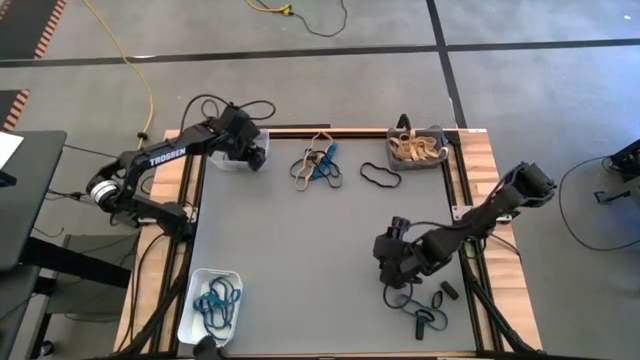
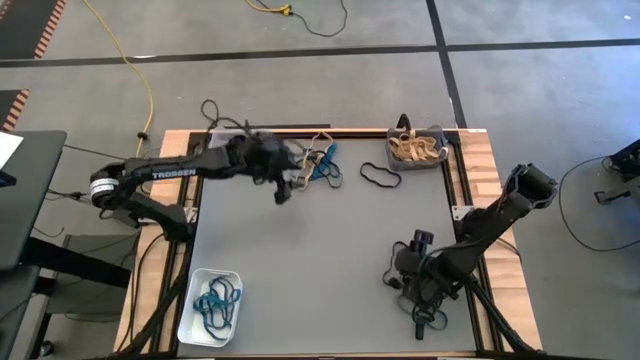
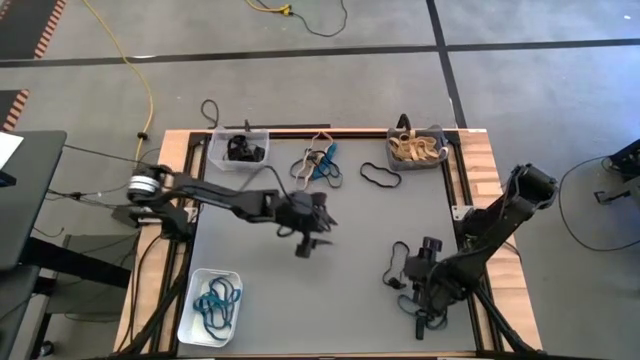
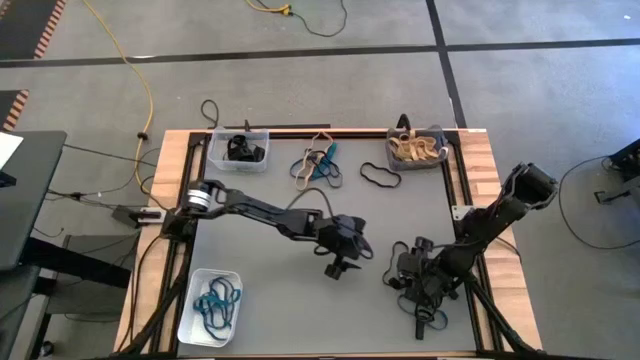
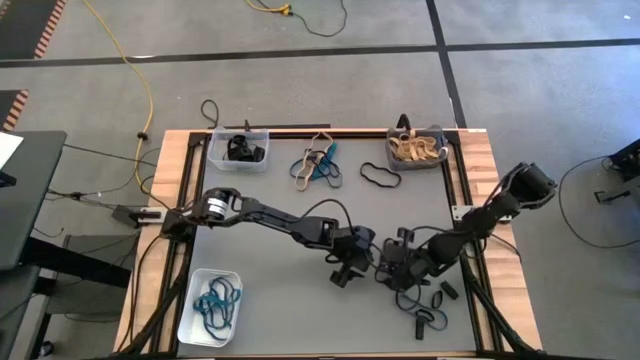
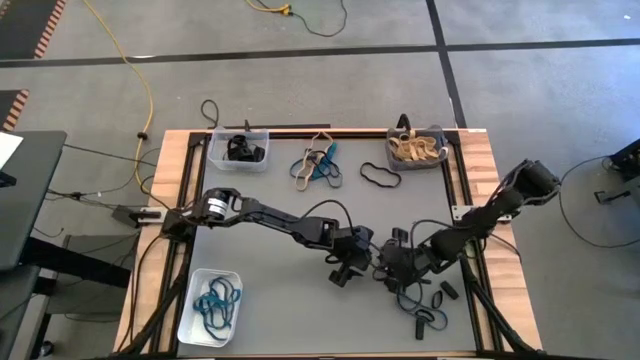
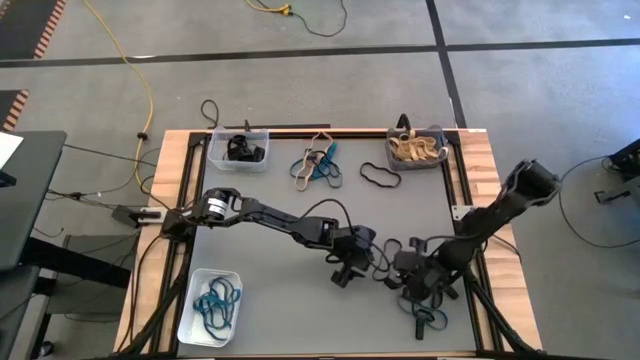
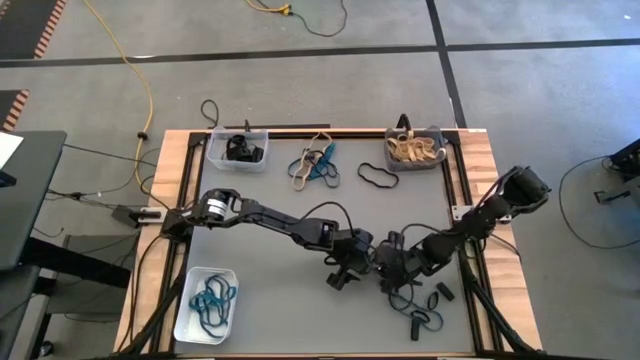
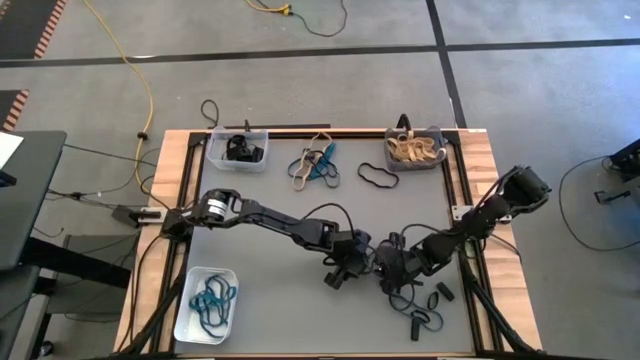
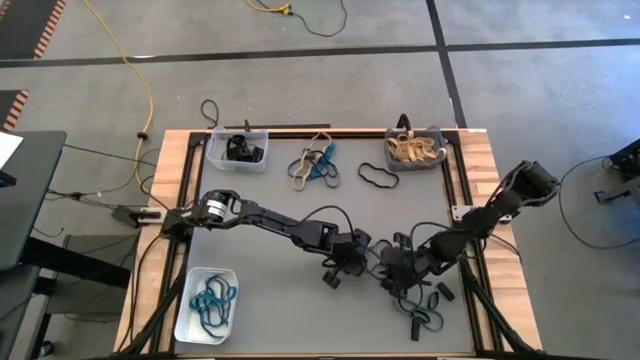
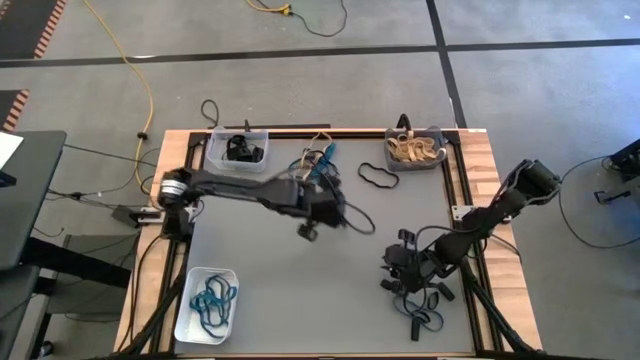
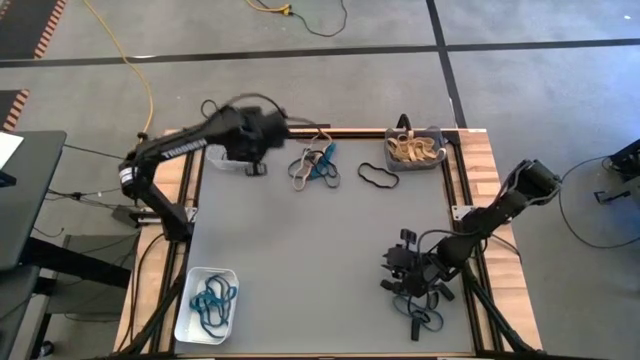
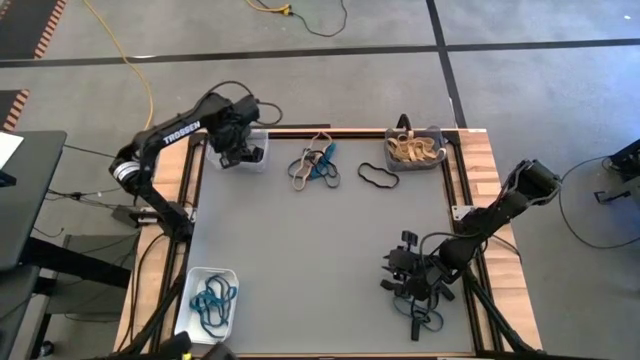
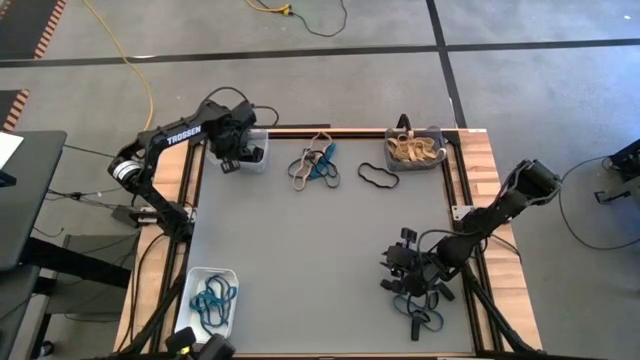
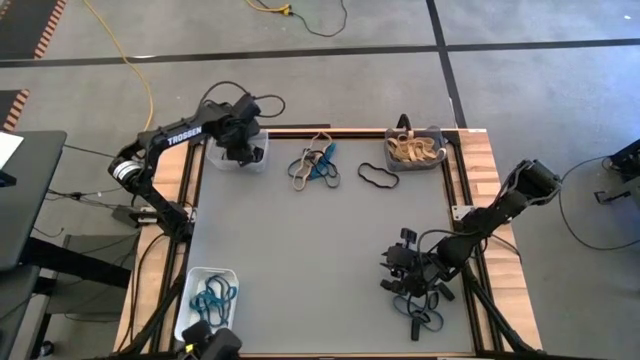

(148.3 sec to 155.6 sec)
Task: Sort rubber bands into baskets
Put the black rubber band into the transparent bin

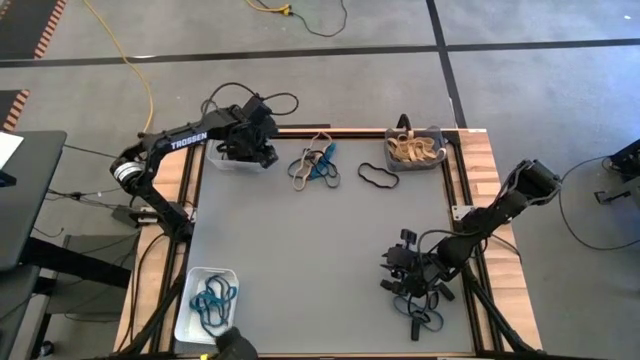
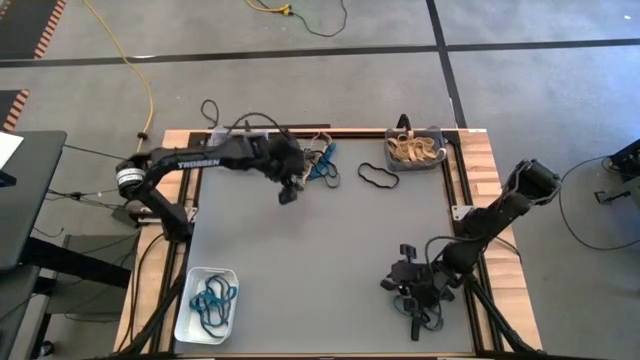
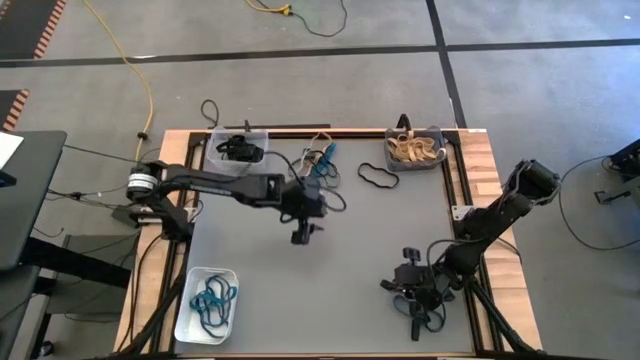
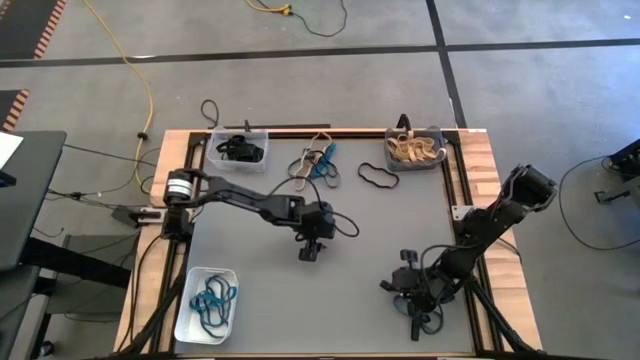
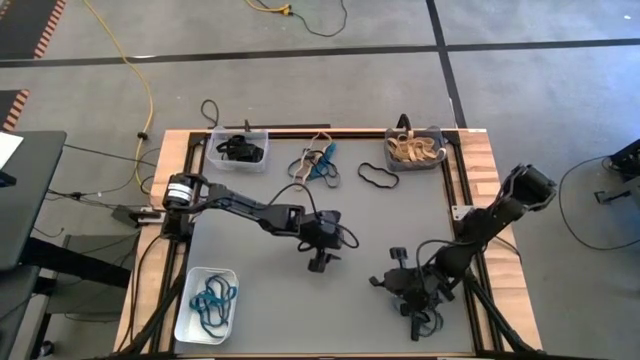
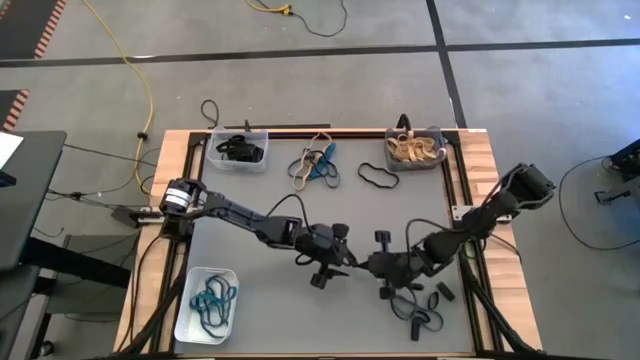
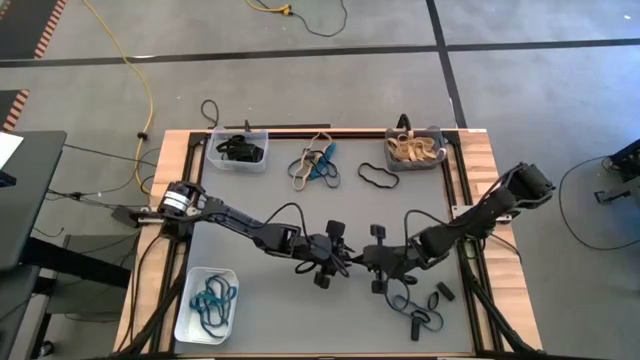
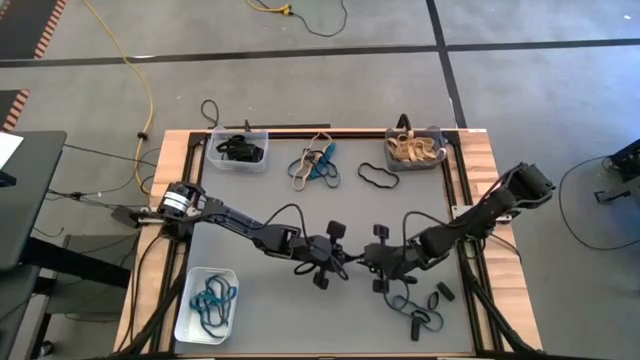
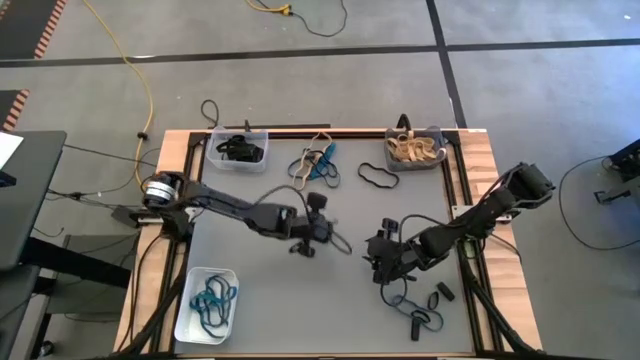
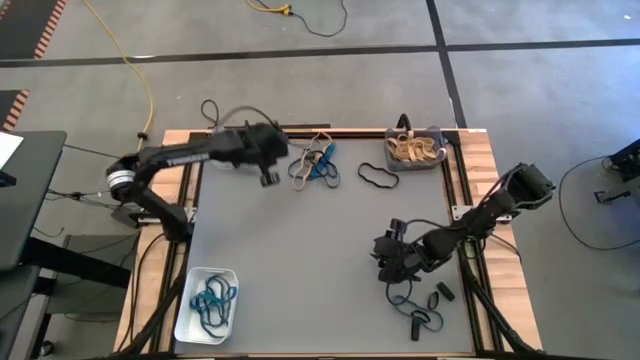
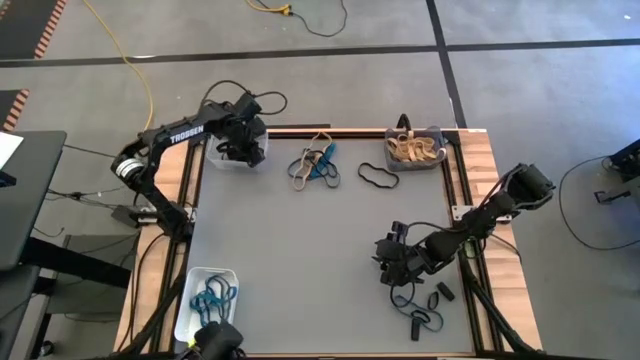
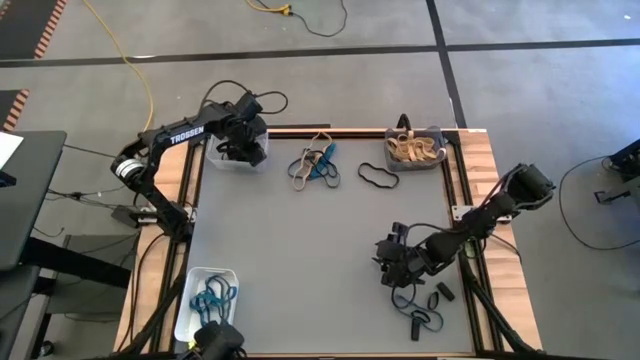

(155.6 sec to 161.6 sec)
Put the black rubber band into the transparent bin

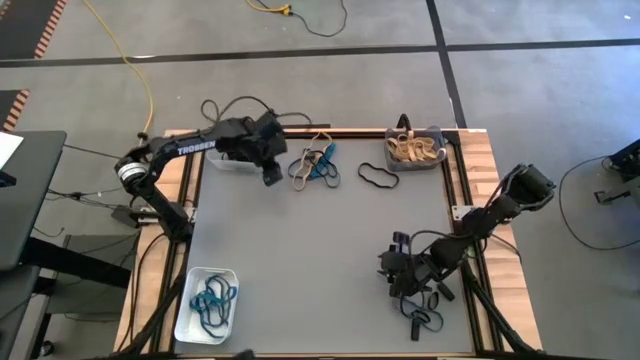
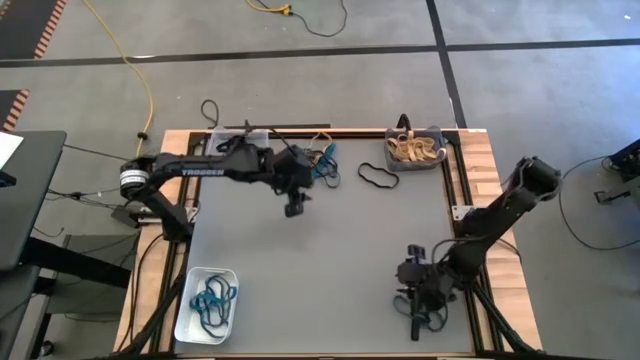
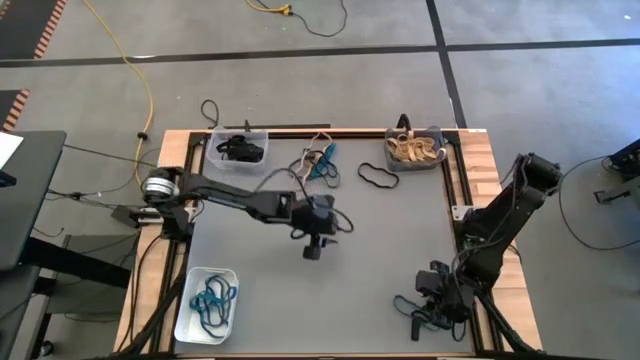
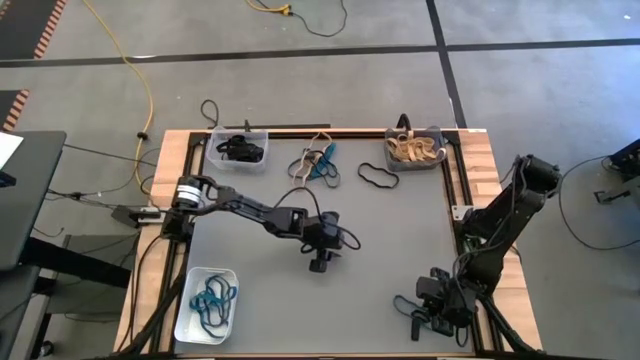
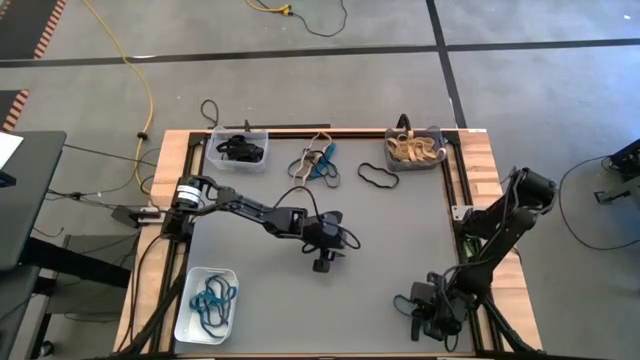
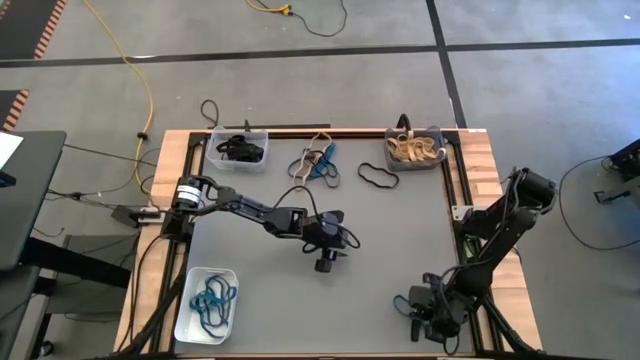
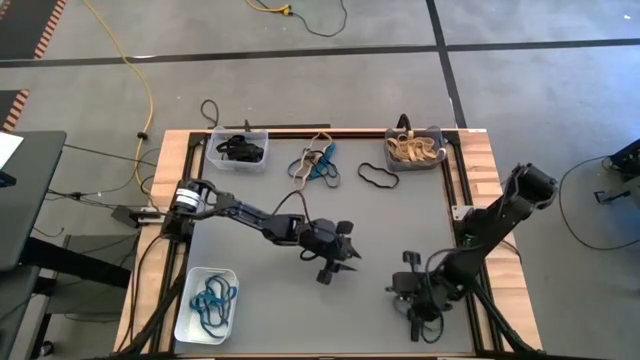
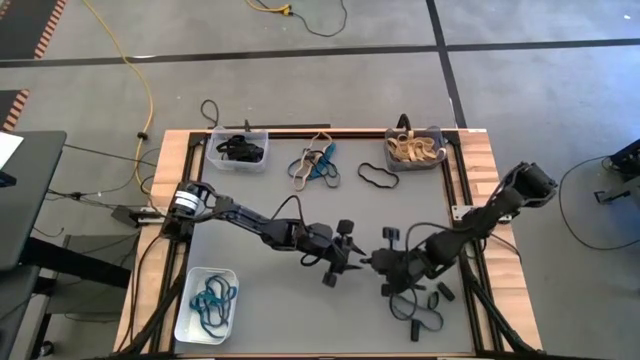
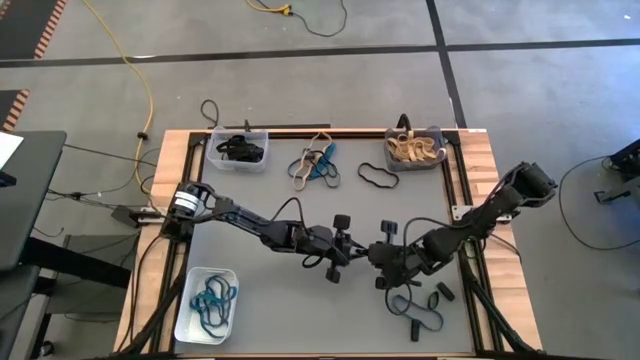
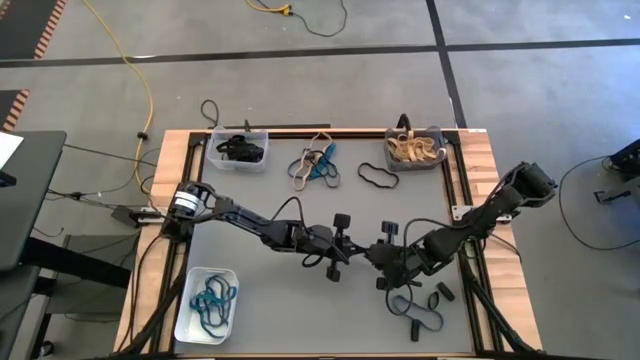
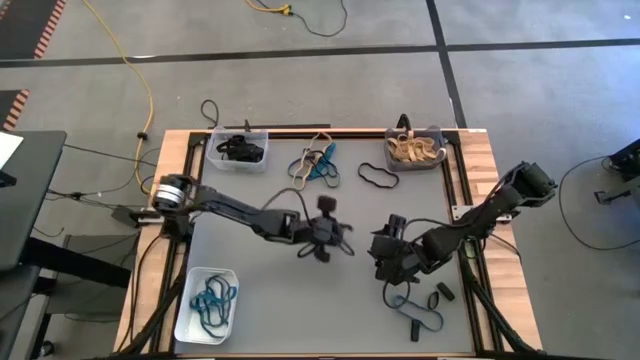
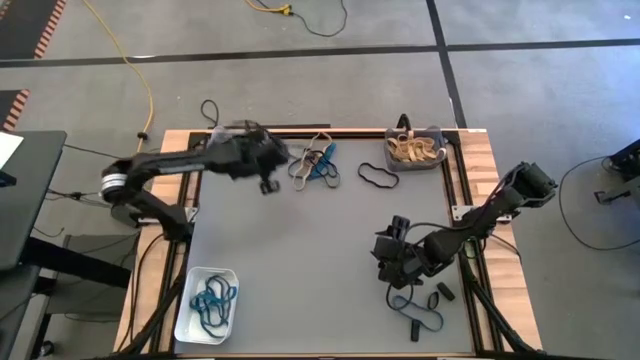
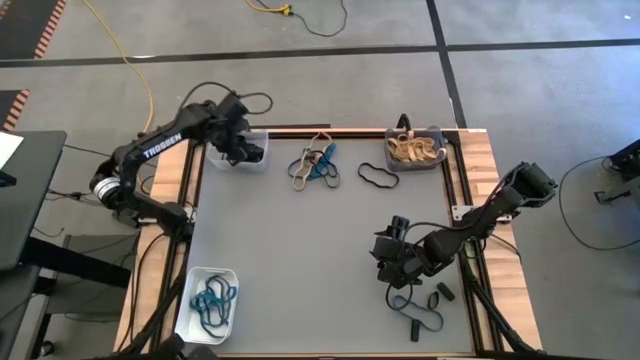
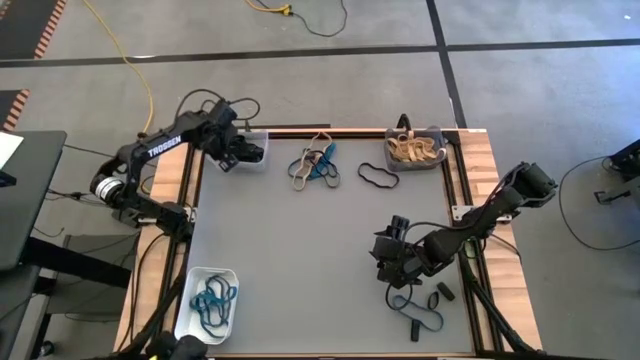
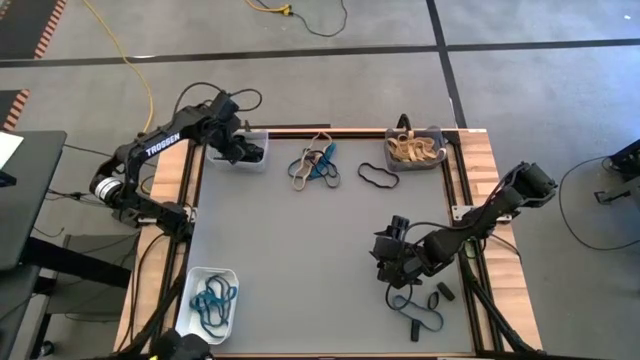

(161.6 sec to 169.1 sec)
Put the black rubber band into the transparent bin
